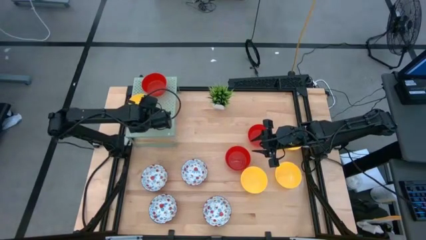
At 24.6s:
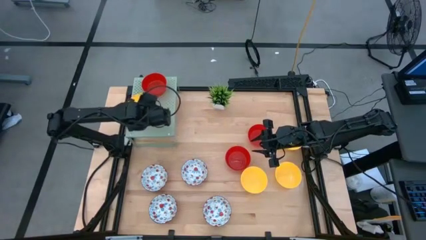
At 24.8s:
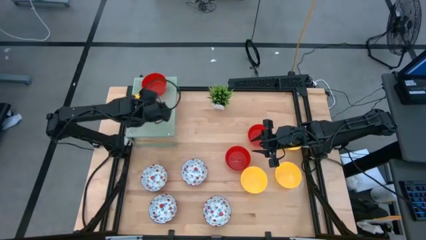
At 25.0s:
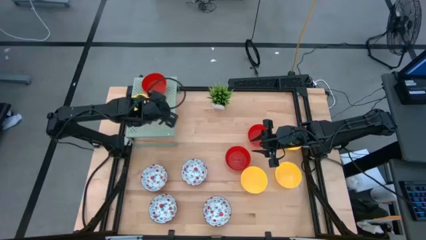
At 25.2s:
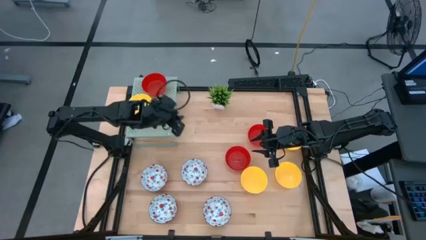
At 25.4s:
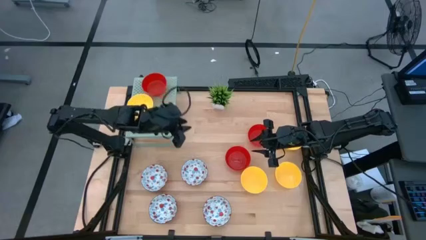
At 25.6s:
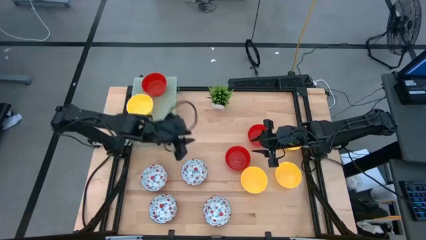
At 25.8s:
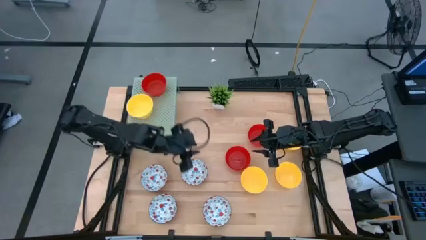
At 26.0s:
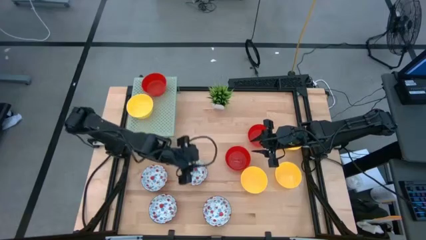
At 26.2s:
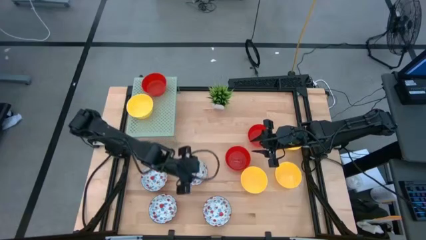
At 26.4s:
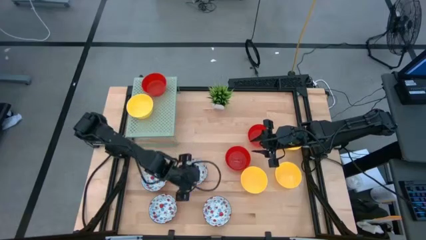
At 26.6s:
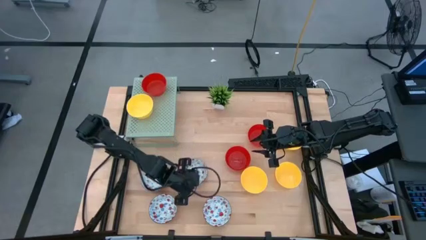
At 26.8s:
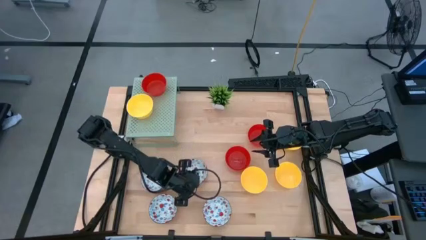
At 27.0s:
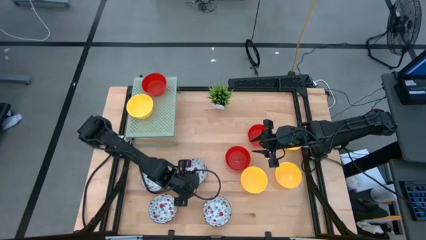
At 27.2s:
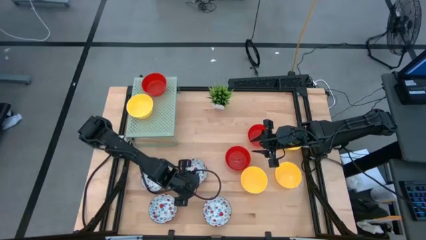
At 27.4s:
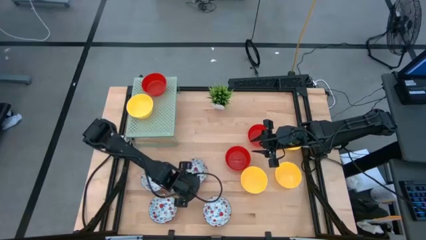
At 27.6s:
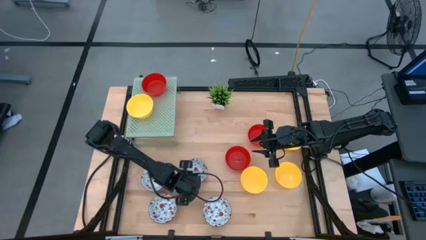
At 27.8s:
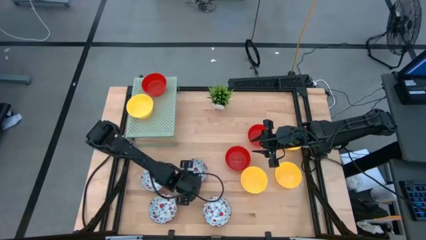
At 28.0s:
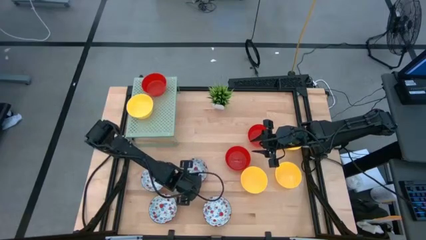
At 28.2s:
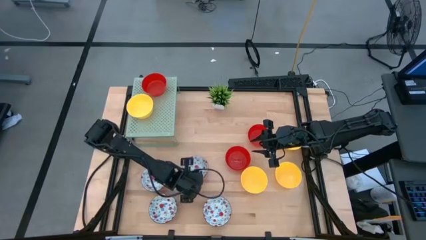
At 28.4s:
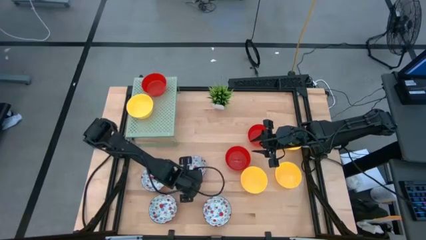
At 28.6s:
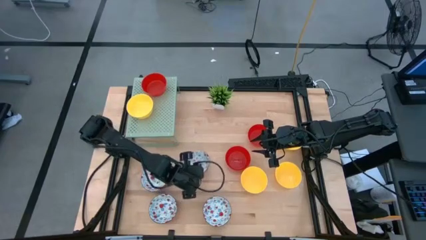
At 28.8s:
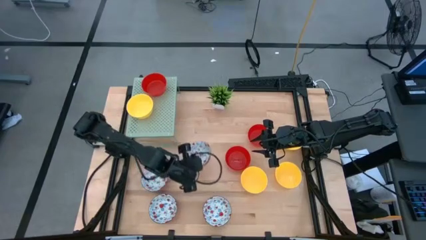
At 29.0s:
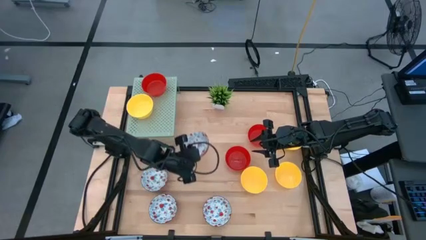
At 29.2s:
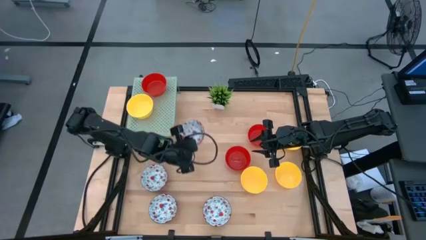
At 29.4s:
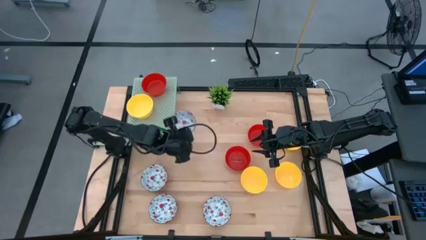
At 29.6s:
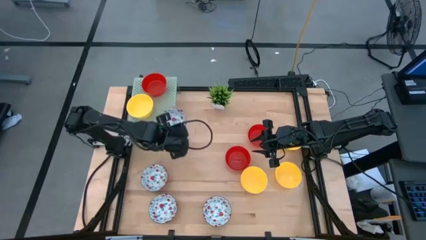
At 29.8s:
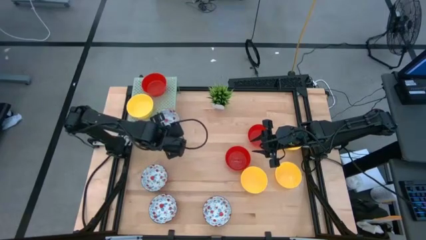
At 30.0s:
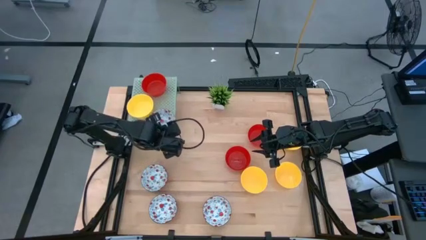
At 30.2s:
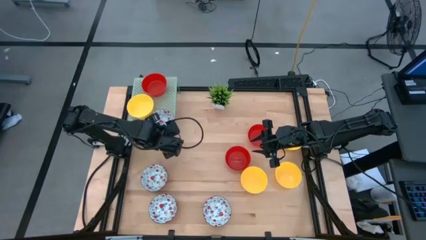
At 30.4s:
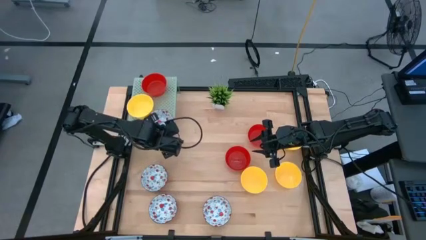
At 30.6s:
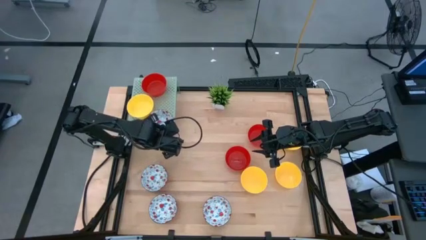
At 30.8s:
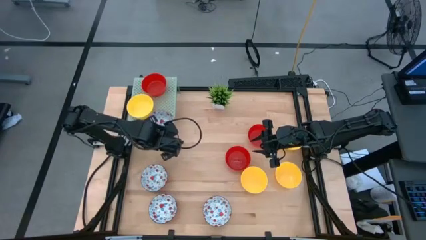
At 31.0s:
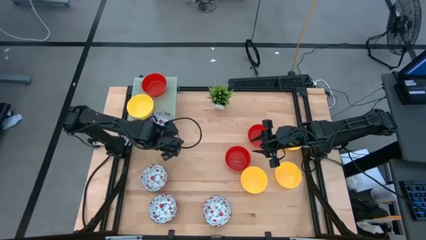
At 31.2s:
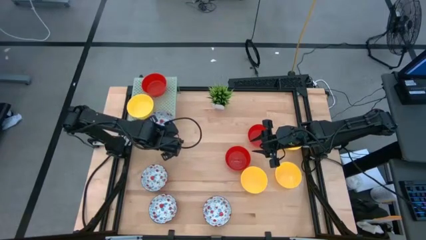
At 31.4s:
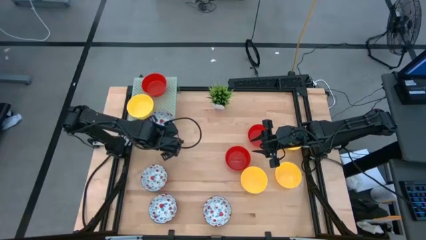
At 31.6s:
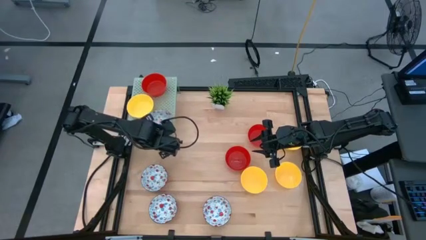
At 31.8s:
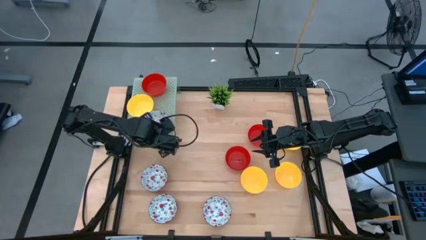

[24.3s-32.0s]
Task: Pick & Place Mini bowls
Put the red and white bowl on the shelf

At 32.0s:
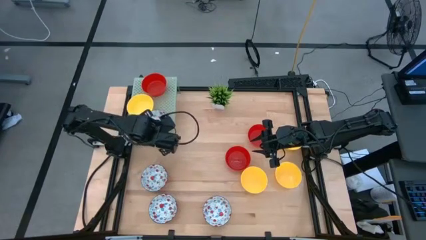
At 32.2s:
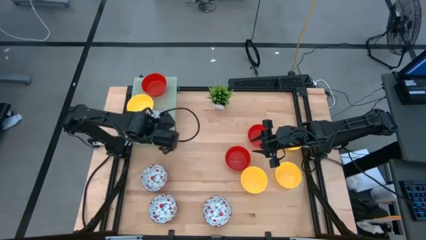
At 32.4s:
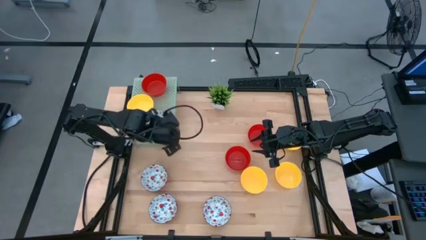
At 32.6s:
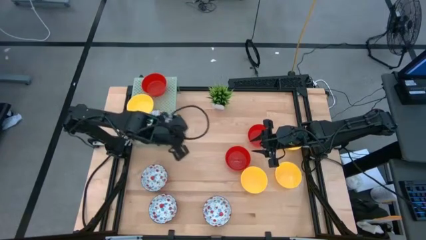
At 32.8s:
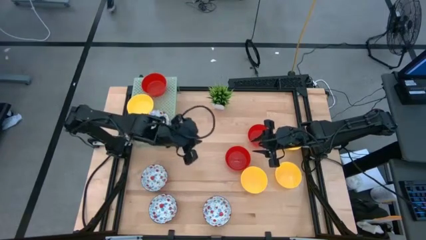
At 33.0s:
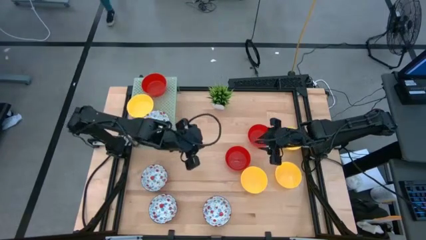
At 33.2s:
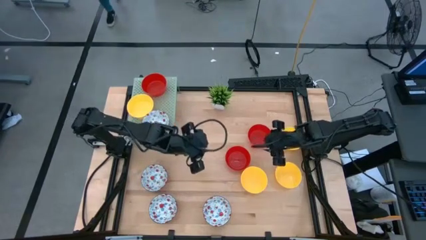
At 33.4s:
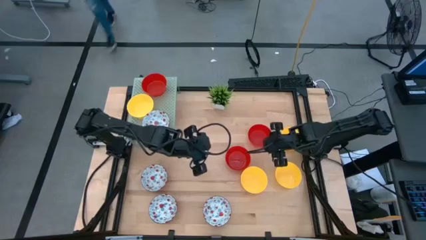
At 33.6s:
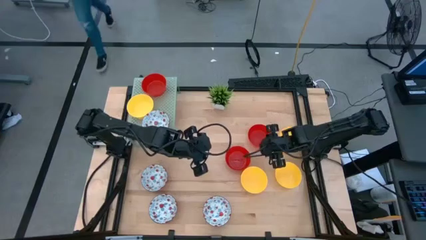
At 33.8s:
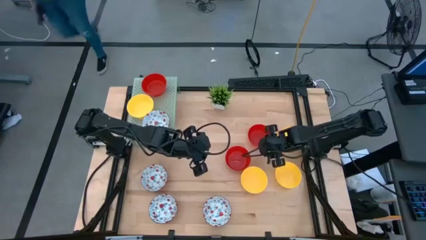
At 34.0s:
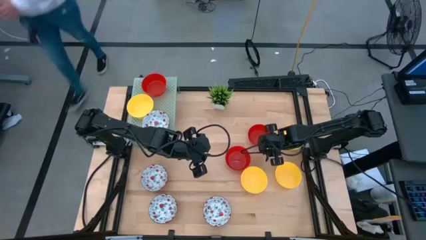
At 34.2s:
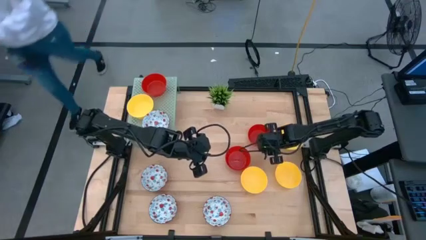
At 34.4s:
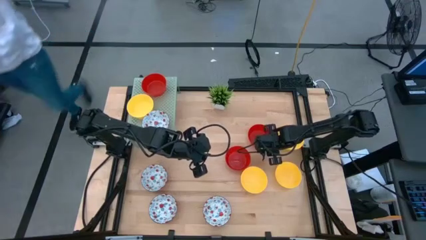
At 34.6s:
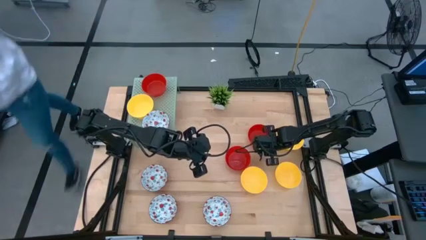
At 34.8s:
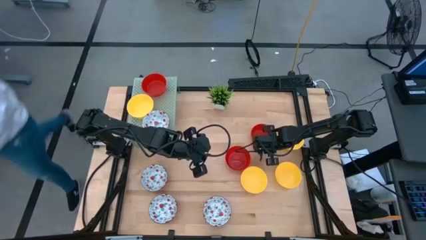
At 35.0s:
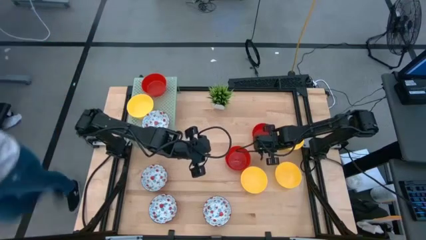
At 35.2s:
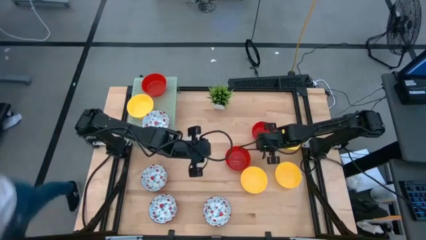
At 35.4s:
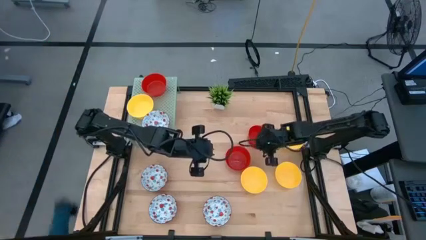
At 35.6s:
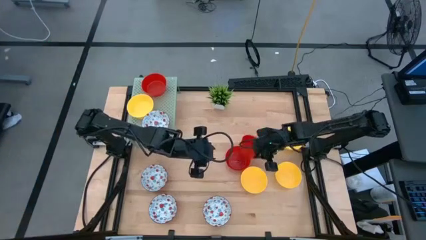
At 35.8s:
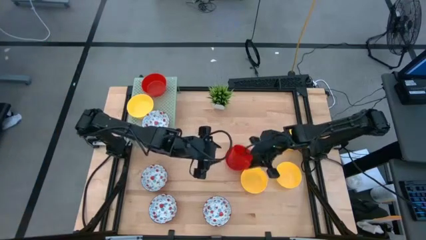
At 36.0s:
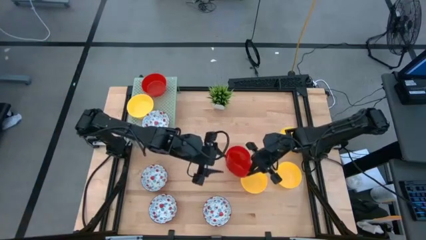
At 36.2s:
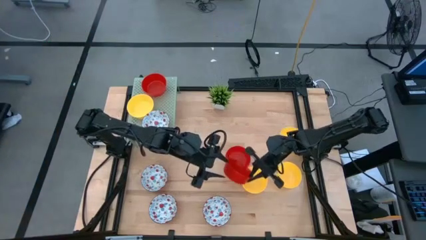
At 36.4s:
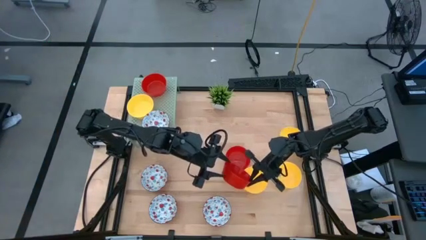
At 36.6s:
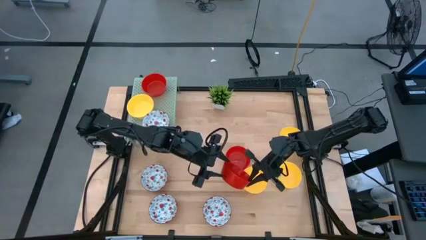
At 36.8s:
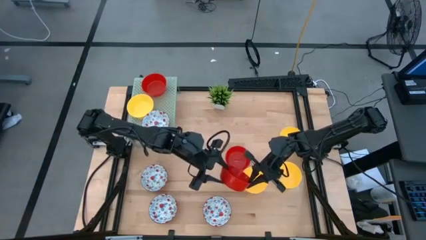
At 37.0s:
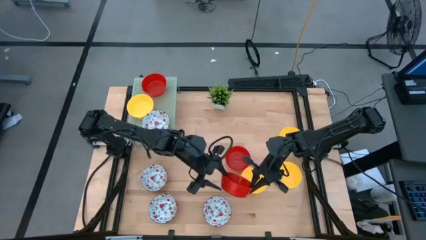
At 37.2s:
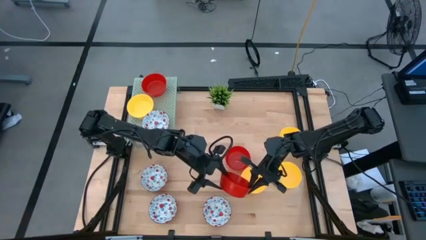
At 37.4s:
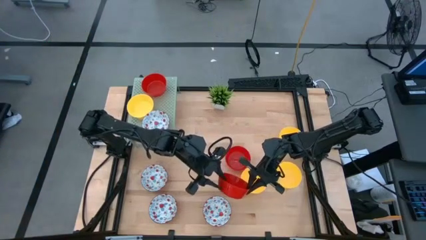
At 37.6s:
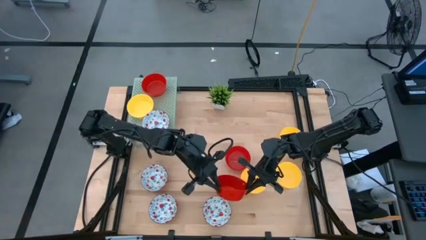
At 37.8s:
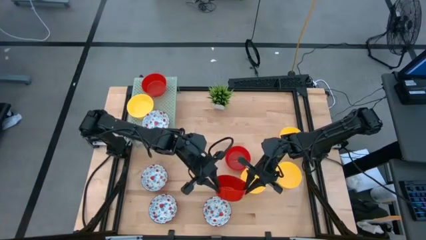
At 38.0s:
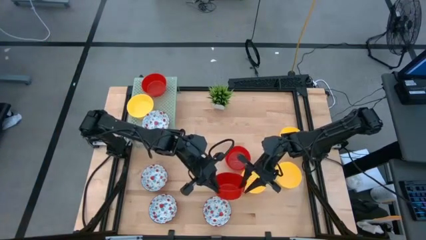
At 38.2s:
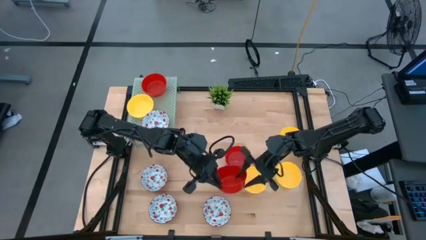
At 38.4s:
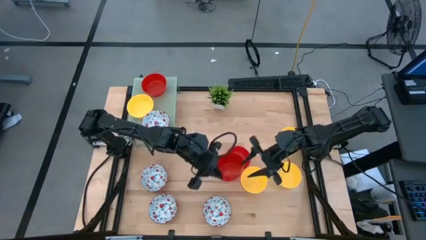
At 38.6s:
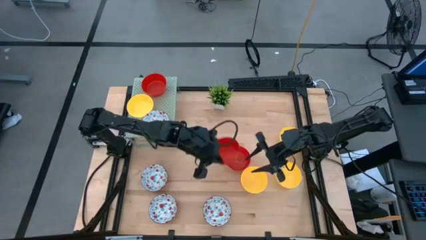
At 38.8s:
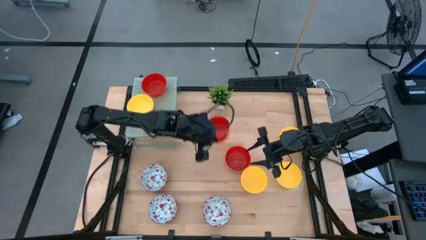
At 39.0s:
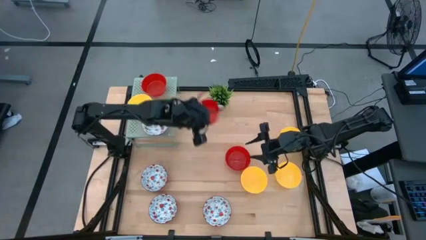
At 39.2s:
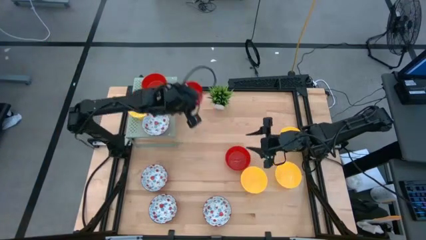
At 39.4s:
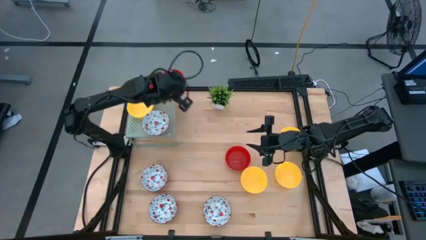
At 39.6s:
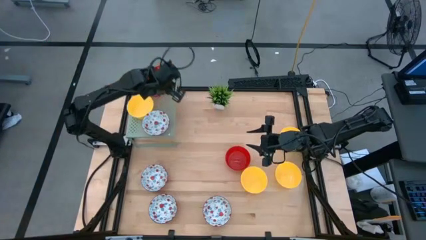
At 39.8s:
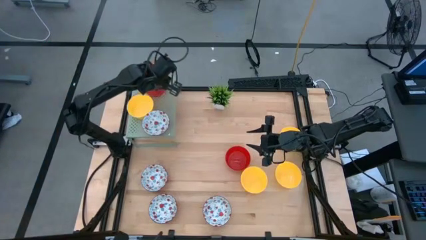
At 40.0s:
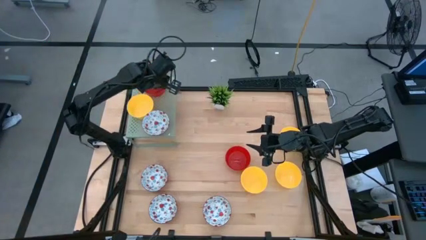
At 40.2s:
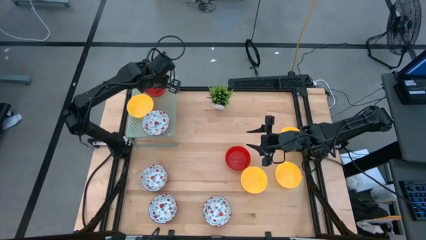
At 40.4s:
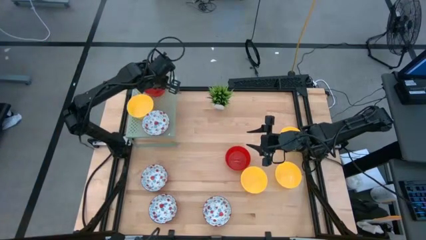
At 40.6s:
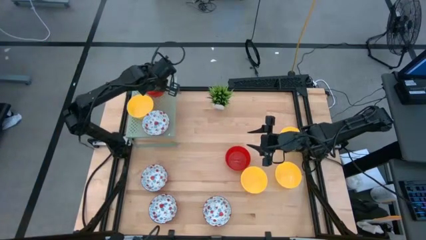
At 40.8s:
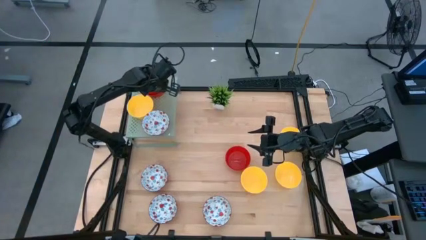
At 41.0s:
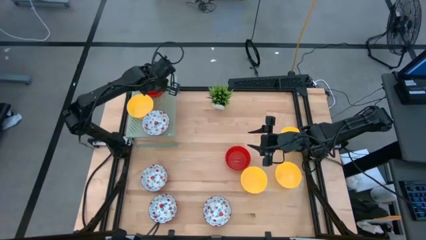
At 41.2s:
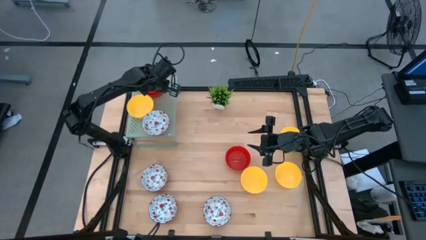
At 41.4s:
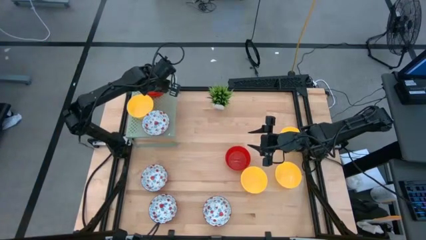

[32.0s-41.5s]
Stack the red bowl on the red bowl on the shelf

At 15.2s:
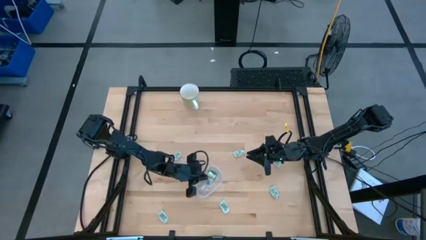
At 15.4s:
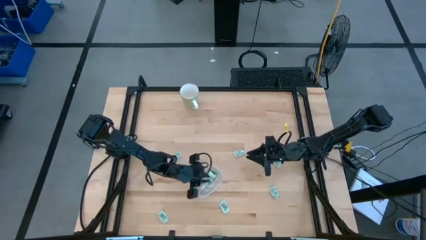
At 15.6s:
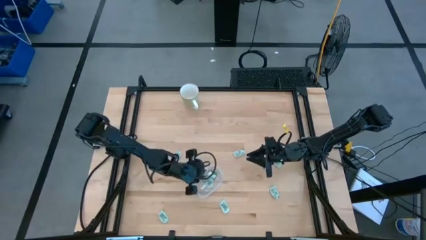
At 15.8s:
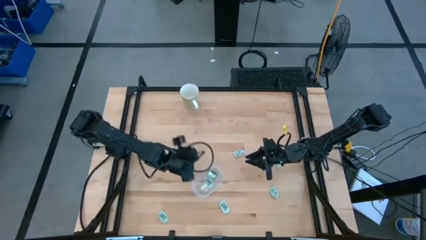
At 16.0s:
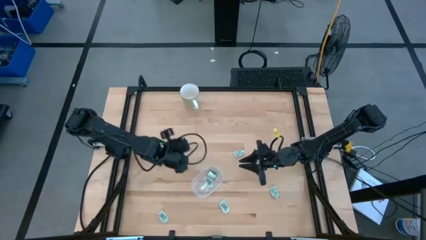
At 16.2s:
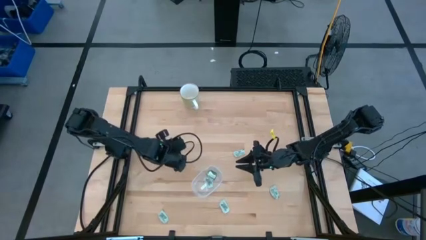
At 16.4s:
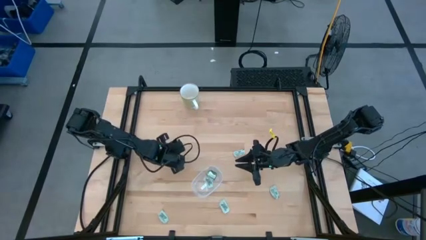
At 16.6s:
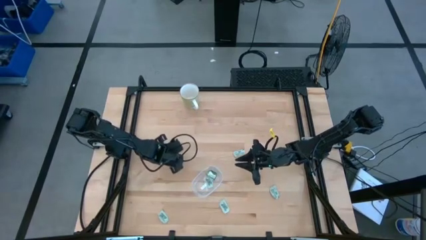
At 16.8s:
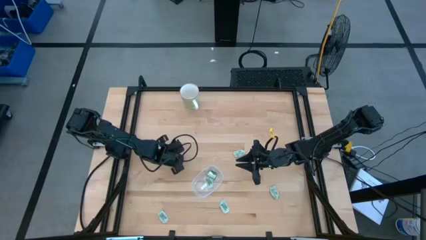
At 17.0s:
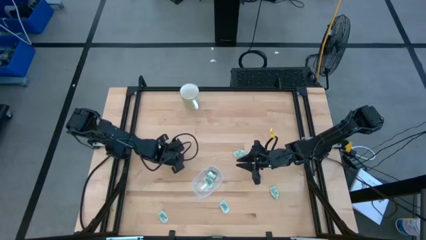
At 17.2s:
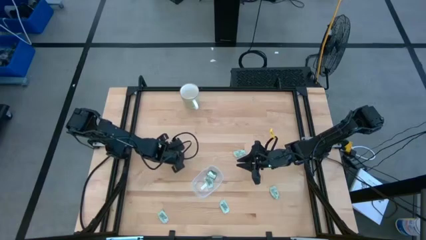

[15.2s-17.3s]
Task: Pick and place Stevia / Truvia into bins
Put the light green stevia packet into the transparent bin
